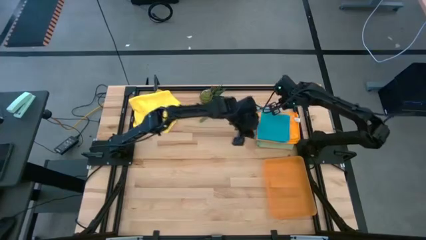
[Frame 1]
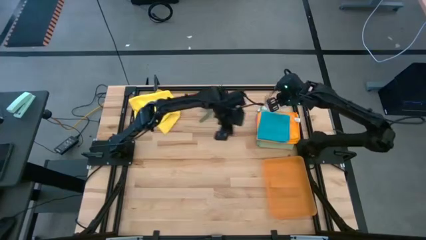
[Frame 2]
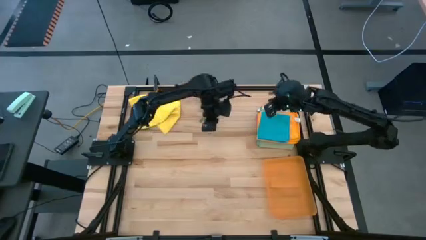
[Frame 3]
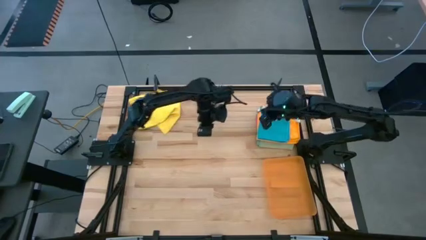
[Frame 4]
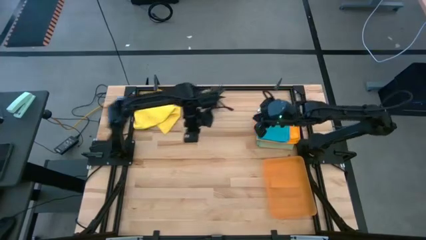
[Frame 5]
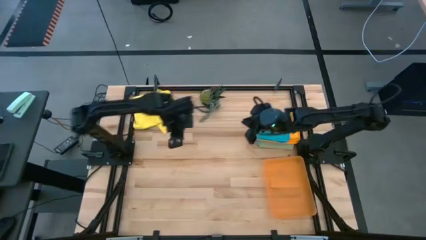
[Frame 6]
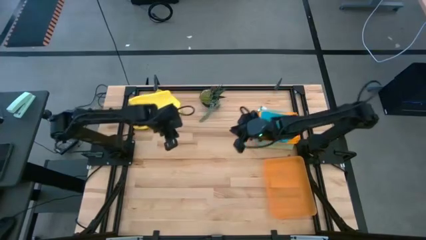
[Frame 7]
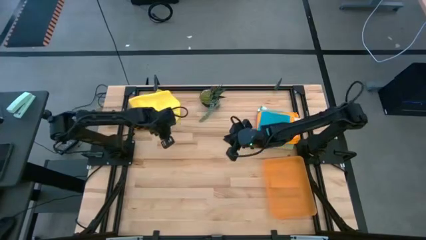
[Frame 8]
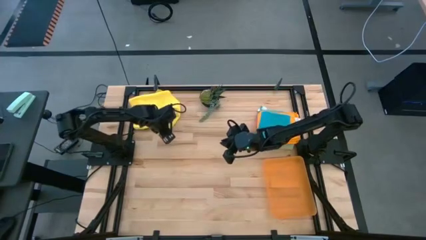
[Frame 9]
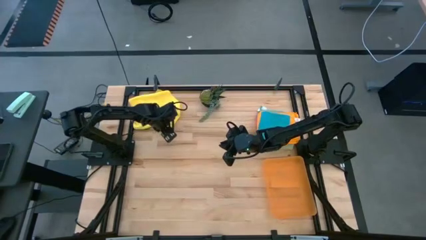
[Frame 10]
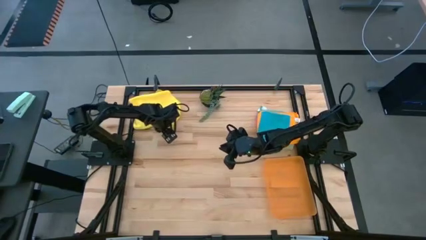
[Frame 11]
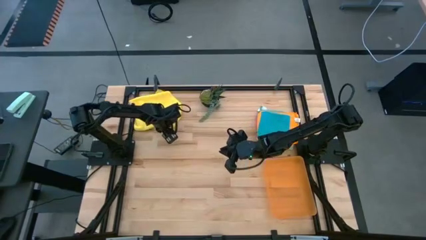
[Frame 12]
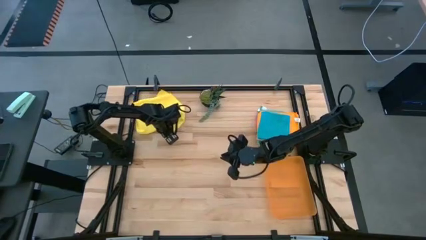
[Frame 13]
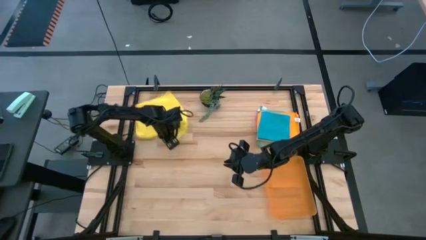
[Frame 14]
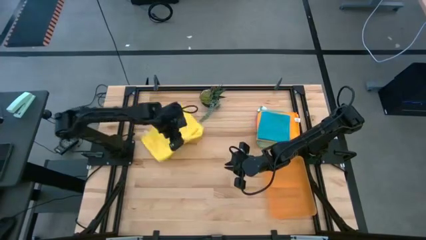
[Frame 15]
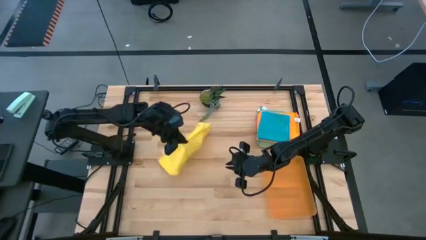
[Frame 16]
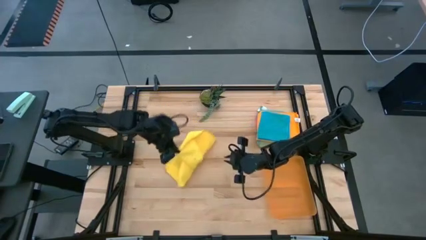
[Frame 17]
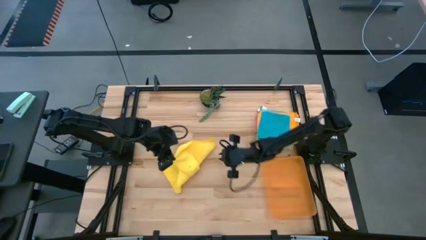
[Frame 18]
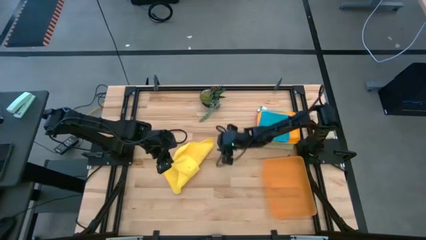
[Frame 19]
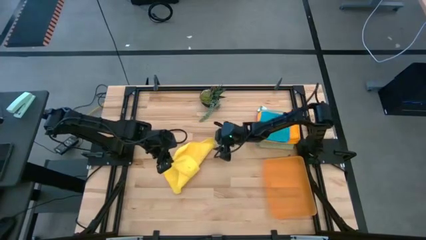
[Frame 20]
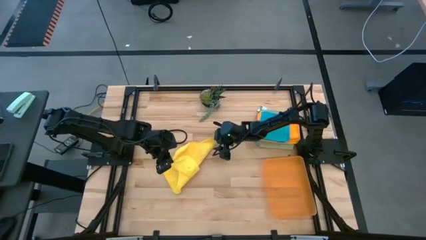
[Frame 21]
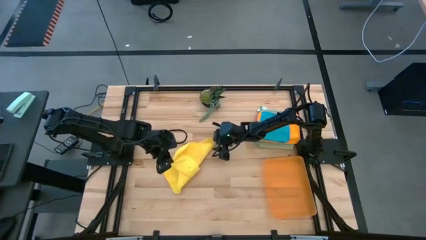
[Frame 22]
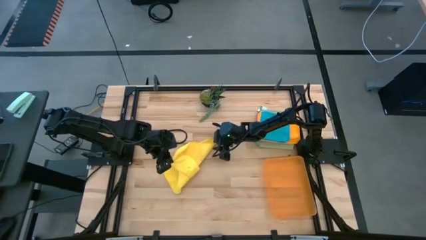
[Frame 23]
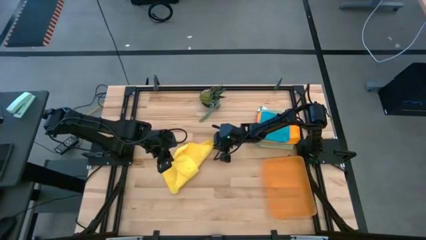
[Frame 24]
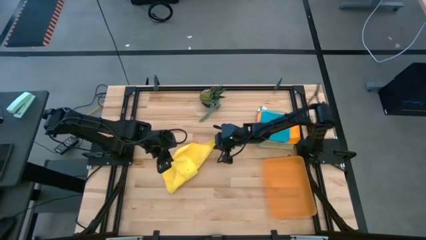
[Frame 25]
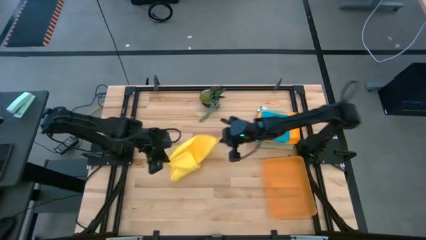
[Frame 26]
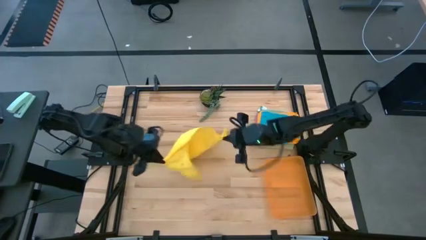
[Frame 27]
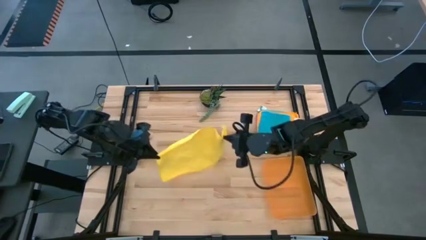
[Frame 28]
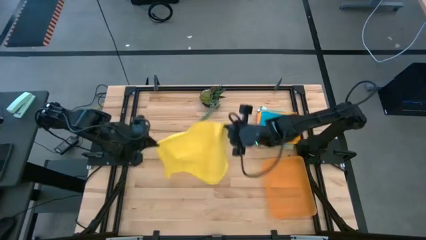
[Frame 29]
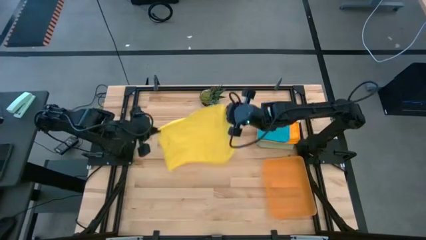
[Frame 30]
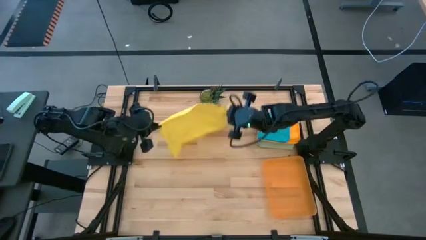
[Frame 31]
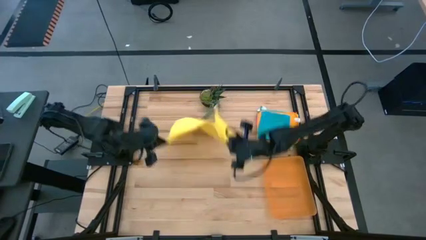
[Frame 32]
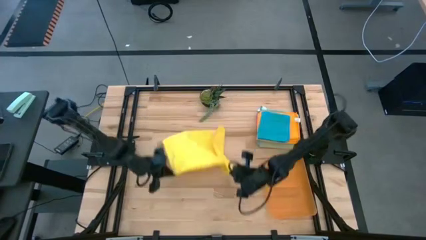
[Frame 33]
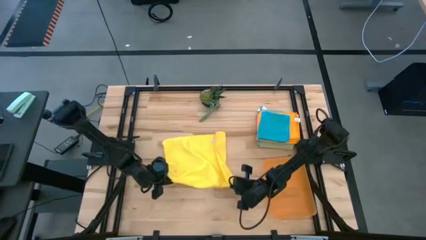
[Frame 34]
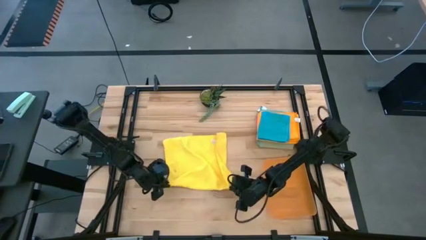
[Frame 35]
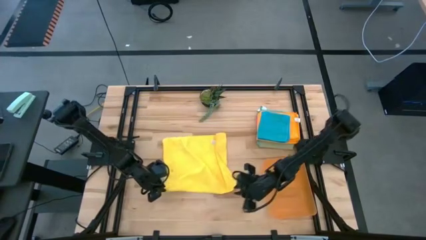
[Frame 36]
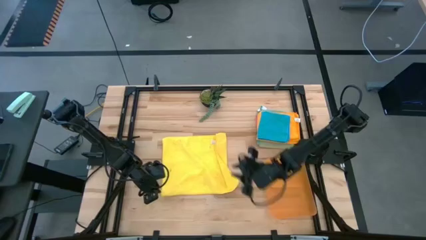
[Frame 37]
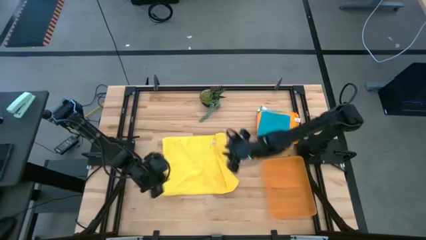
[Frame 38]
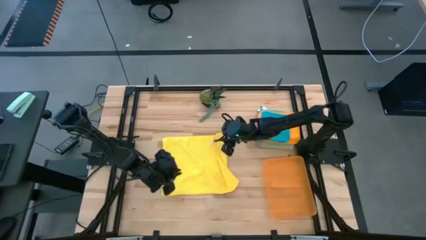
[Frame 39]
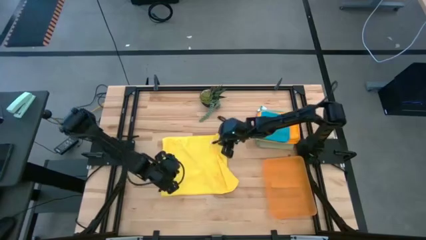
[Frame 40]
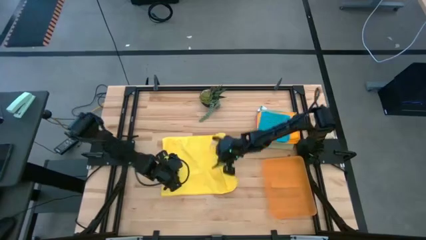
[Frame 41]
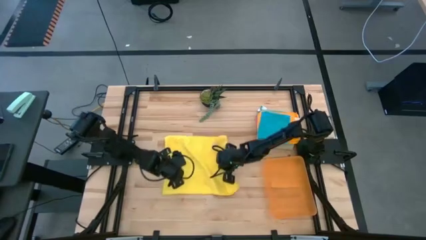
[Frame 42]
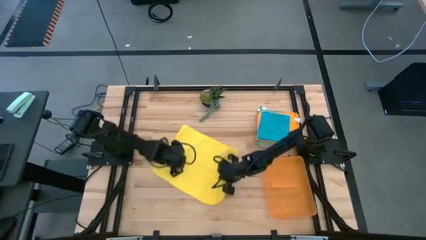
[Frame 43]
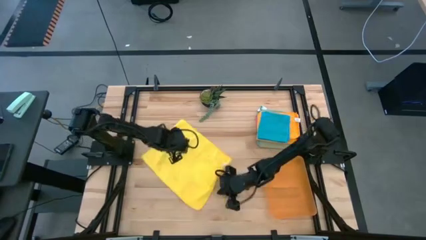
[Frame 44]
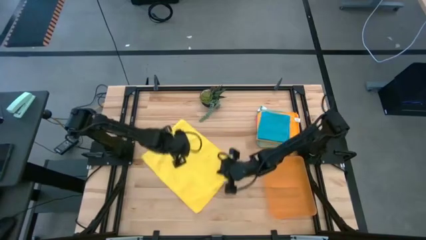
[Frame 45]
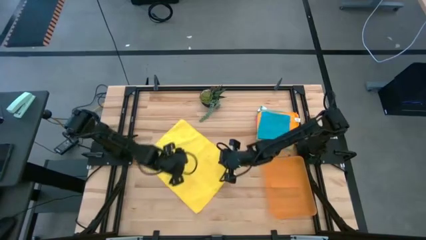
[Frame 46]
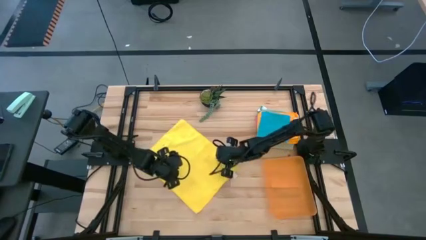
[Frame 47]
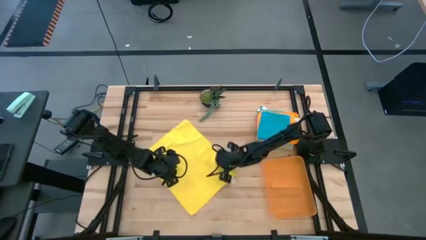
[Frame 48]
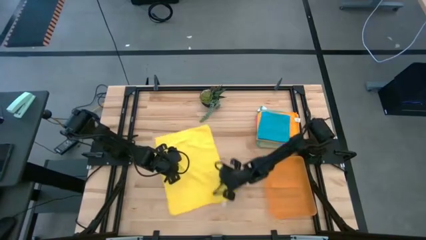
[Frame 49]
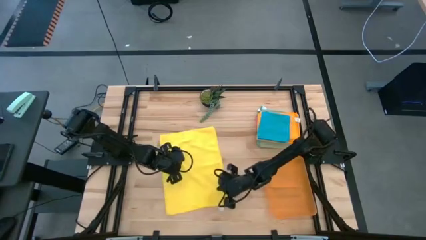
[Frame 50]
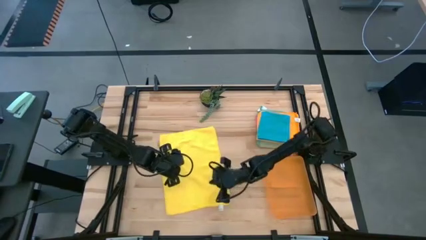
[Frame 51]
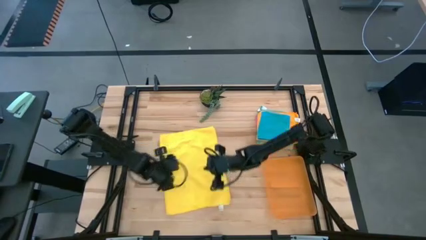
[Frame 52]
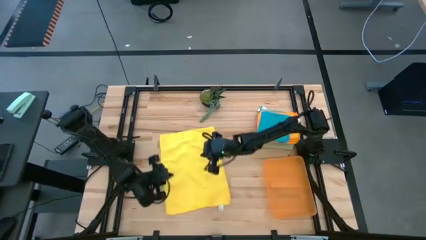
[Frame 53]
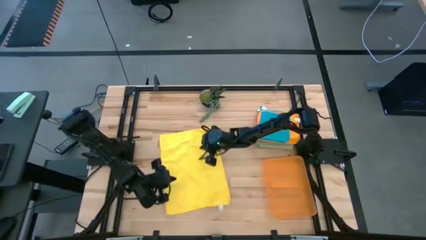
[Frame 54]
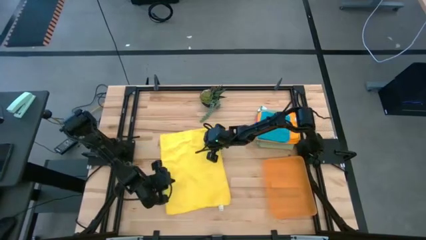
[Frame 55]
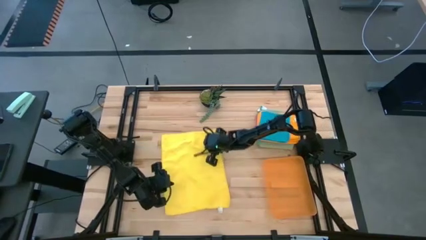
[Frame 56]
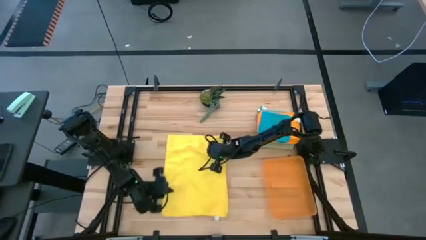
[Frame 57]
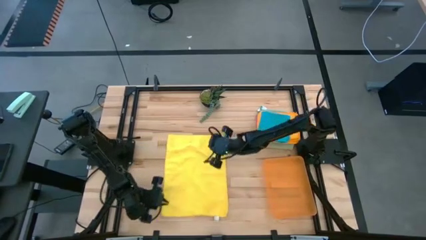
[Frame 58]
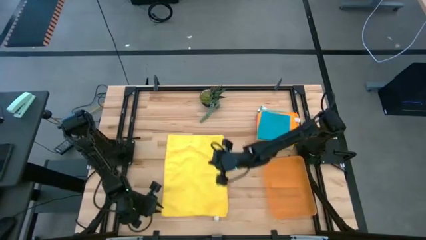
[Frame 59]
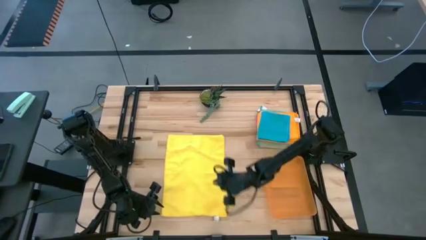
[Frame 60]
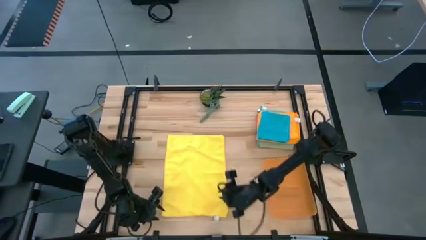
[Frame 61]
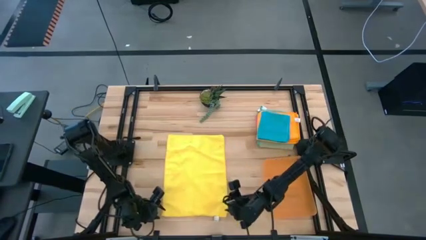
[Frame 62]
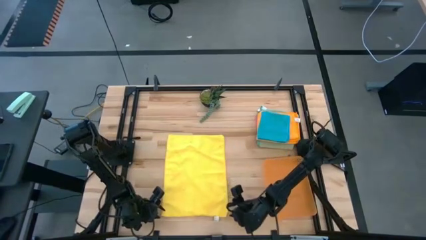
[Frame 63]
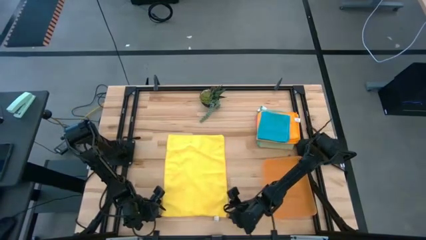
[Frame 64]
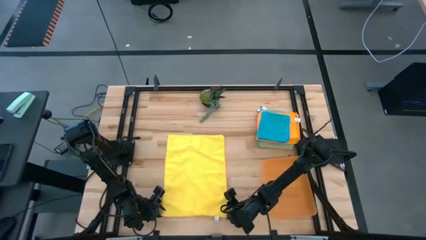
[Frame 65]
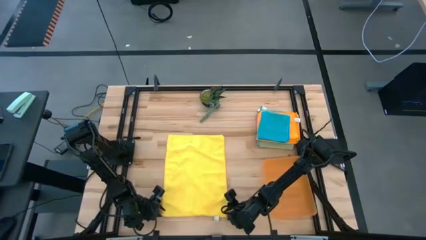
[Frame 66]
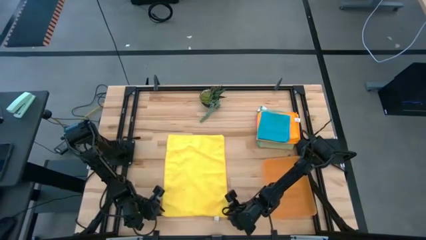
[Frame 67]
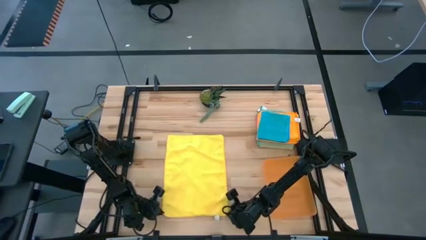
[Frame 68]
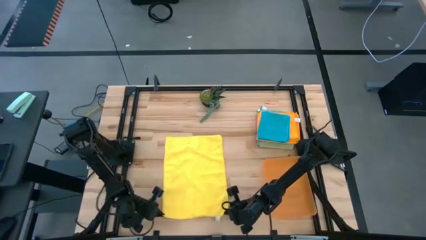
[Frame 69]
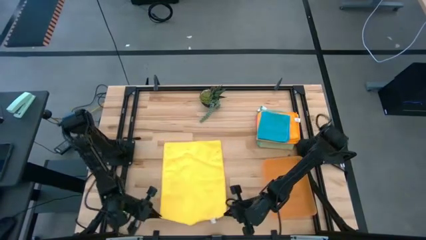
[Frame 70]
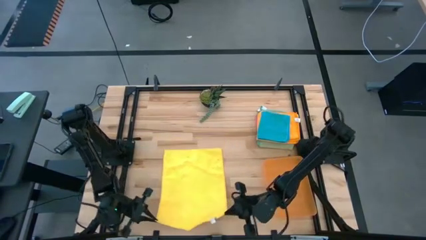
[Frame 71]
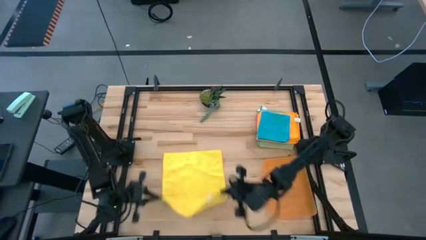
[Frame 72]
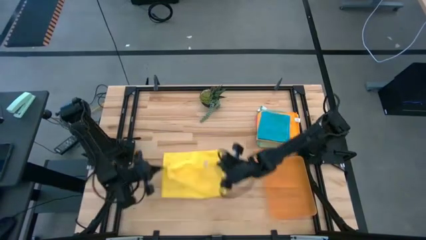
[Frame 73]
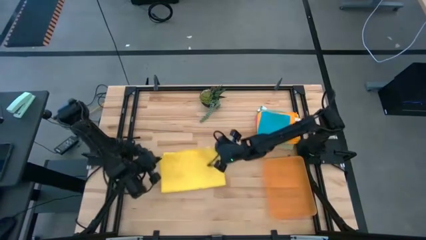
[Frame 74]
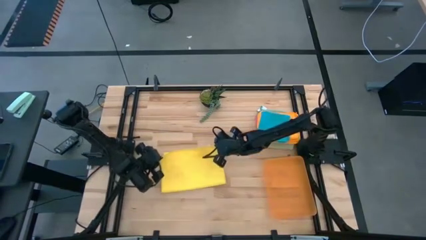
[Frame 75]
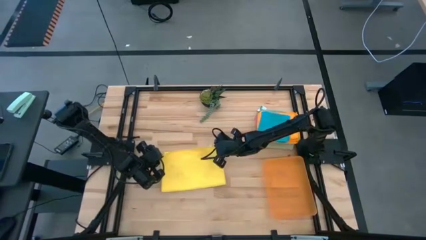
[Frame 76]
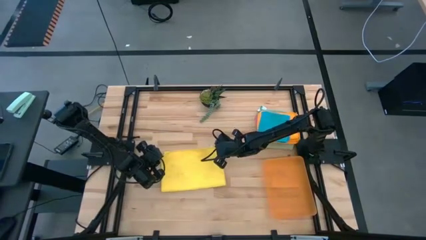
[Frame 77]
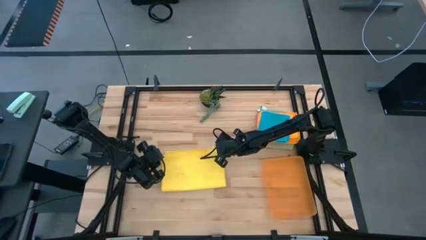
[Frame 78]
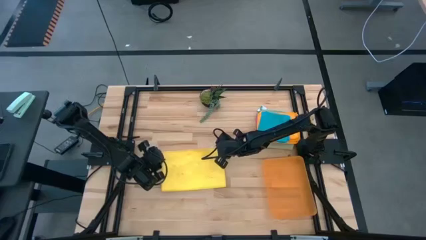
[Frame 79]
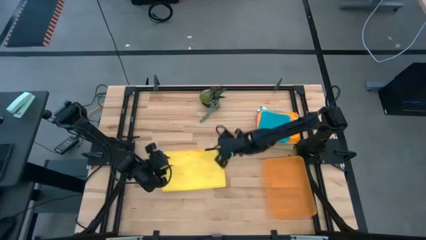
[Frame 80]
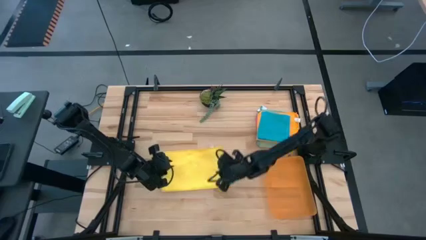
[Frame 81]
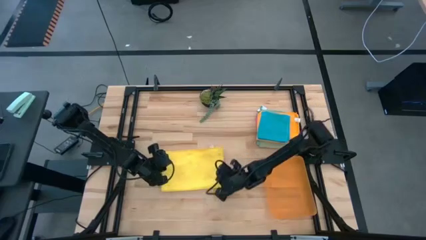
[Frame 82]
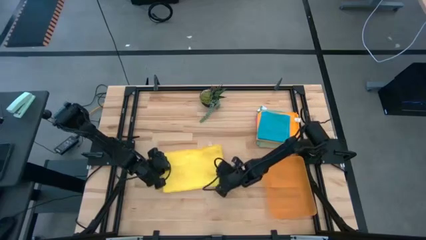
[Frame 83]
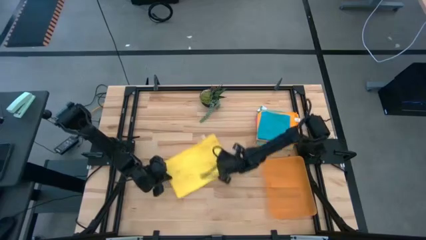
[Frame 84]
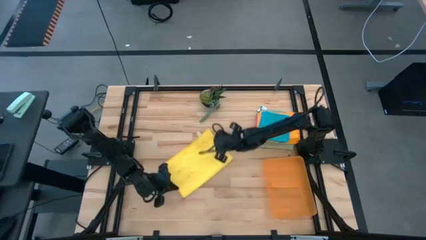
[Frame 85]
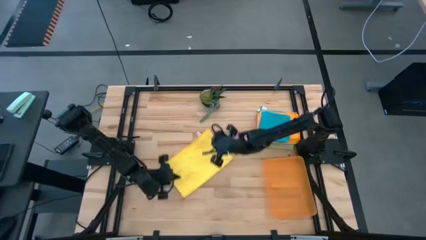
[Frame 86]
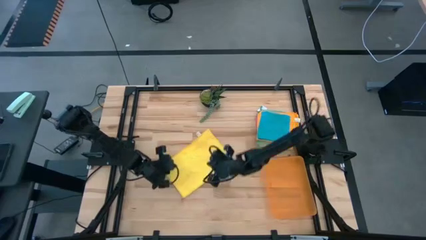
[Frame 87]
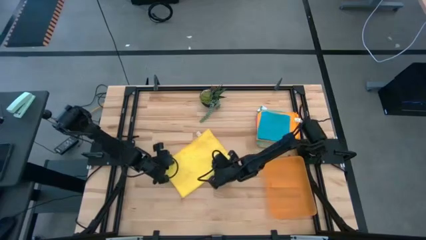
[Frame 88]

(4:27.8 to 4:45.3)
Task: Fold microfiber towels
Fold the yellow microfiber towel
